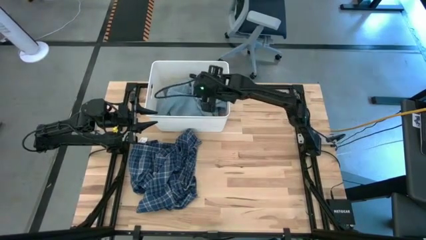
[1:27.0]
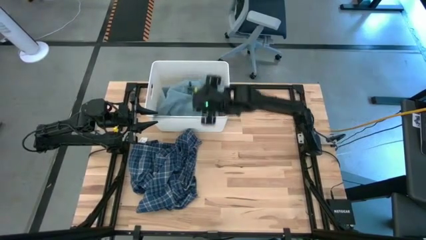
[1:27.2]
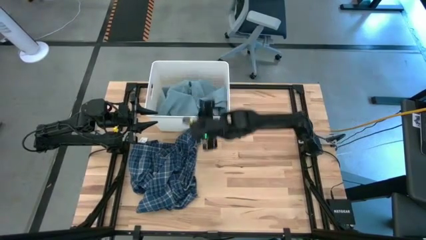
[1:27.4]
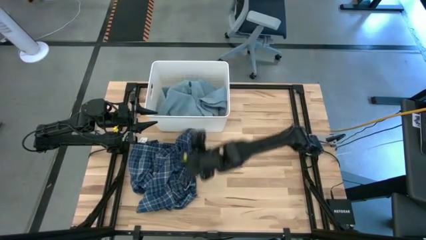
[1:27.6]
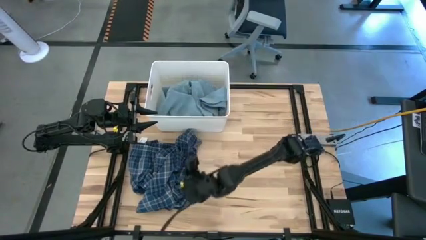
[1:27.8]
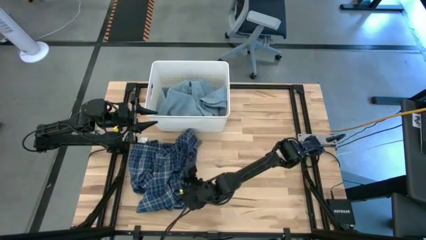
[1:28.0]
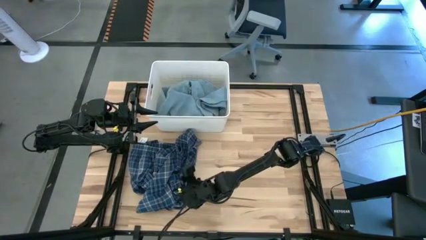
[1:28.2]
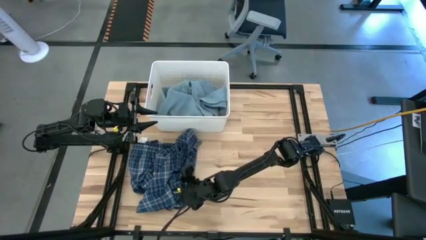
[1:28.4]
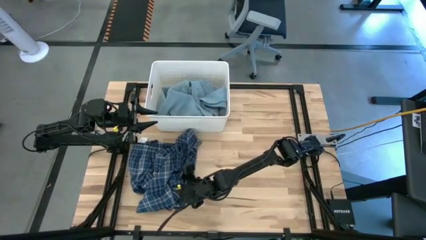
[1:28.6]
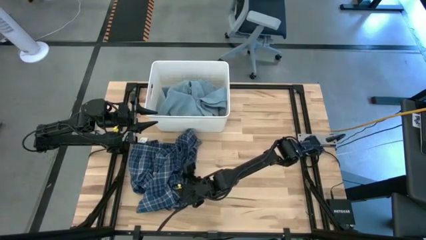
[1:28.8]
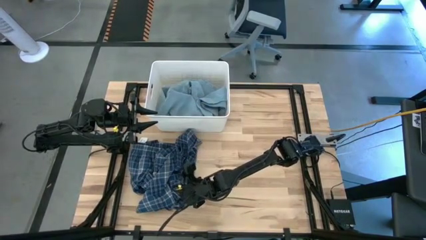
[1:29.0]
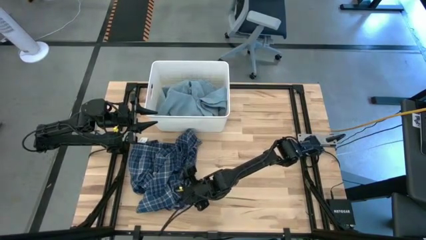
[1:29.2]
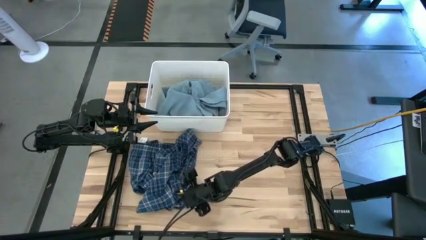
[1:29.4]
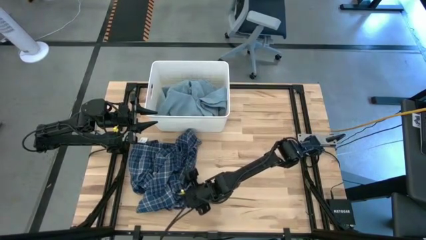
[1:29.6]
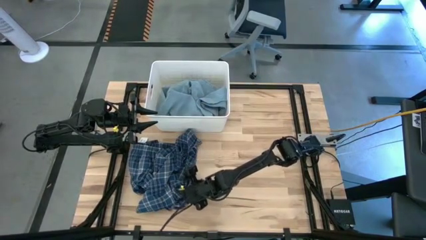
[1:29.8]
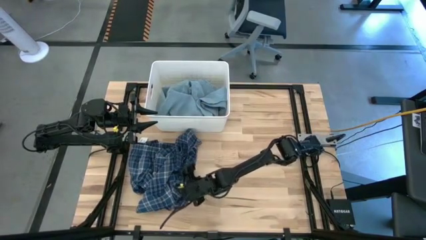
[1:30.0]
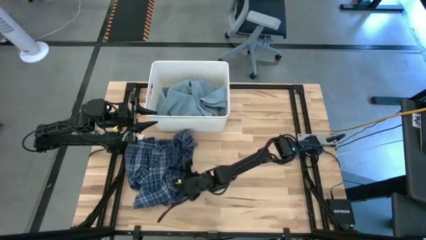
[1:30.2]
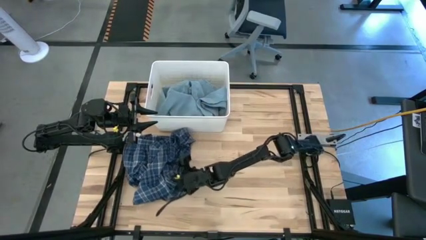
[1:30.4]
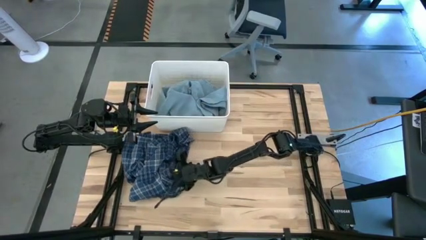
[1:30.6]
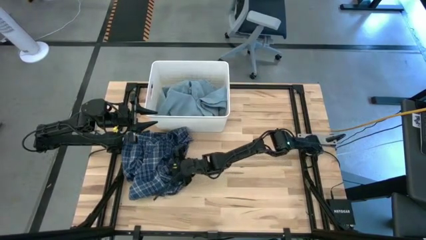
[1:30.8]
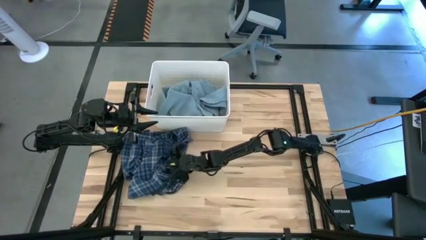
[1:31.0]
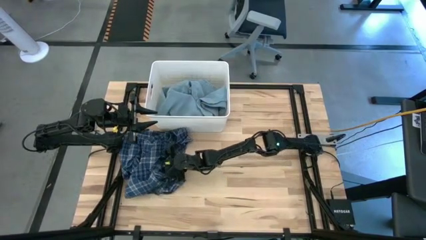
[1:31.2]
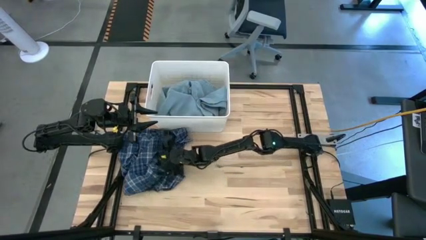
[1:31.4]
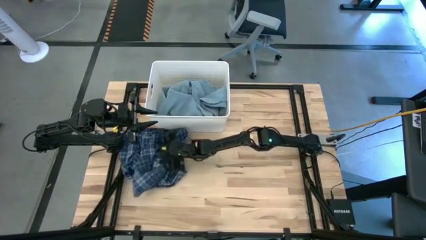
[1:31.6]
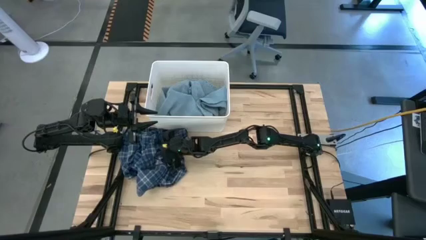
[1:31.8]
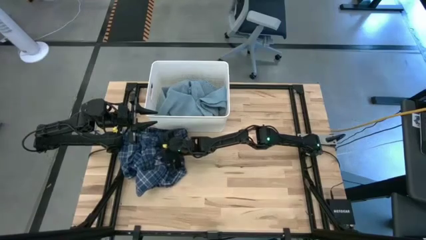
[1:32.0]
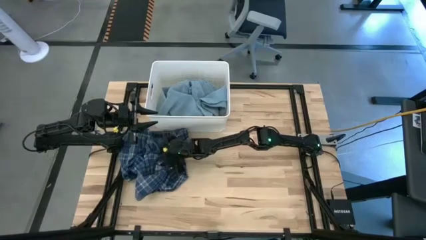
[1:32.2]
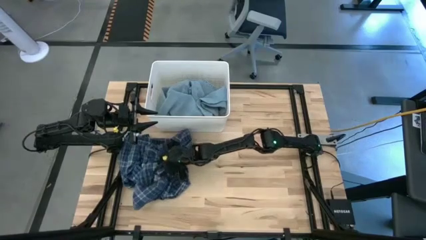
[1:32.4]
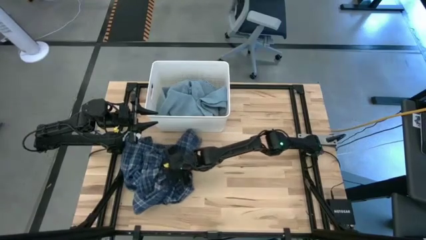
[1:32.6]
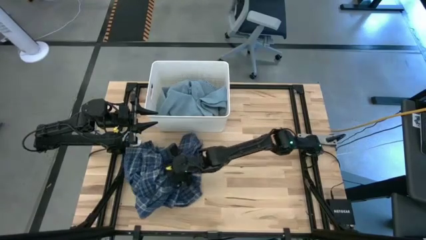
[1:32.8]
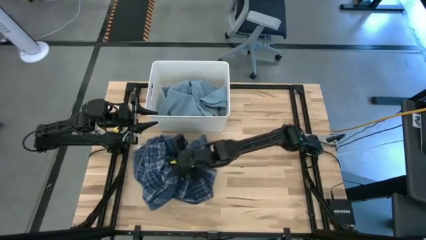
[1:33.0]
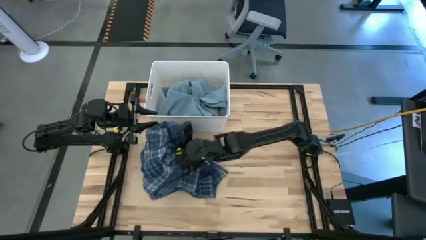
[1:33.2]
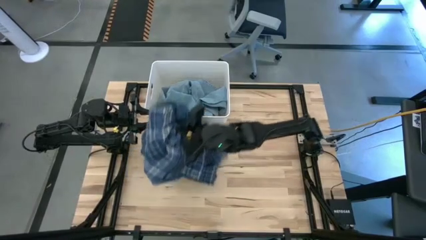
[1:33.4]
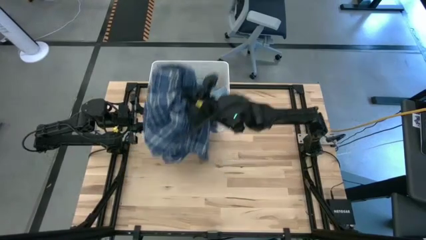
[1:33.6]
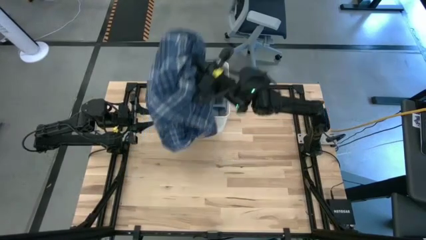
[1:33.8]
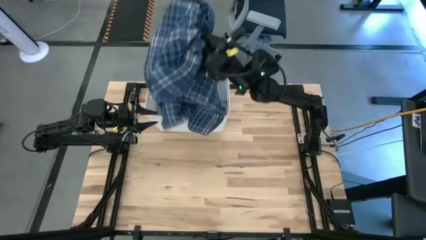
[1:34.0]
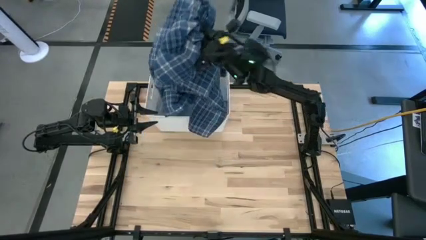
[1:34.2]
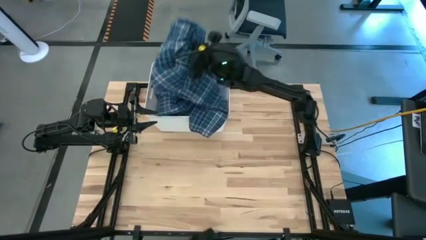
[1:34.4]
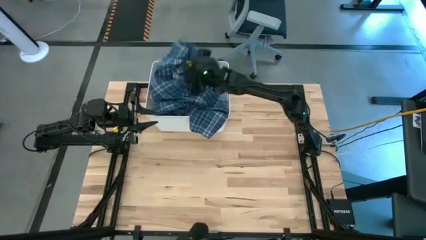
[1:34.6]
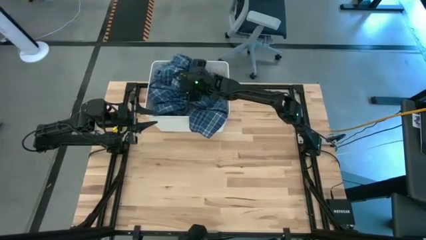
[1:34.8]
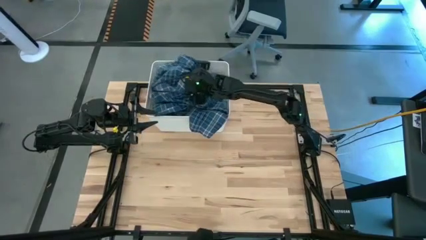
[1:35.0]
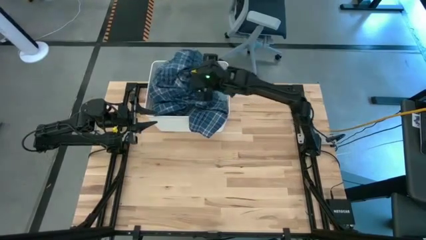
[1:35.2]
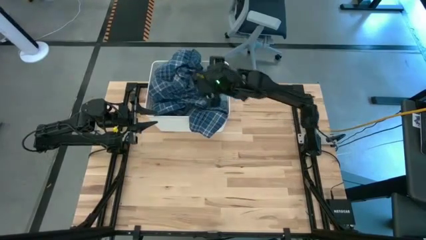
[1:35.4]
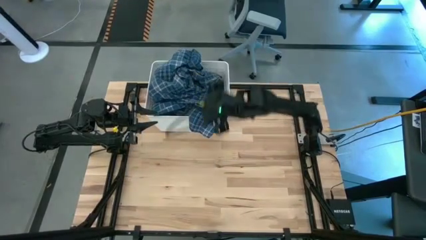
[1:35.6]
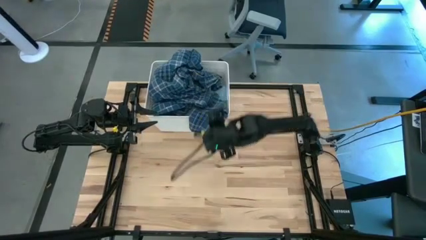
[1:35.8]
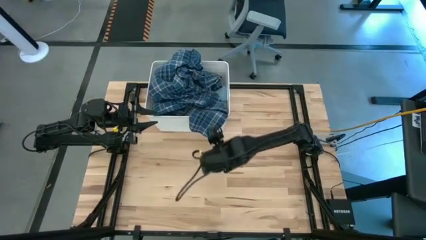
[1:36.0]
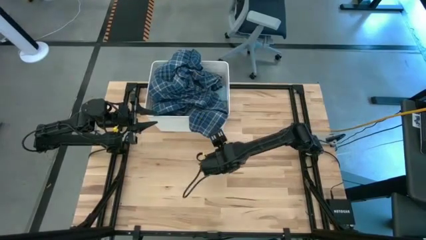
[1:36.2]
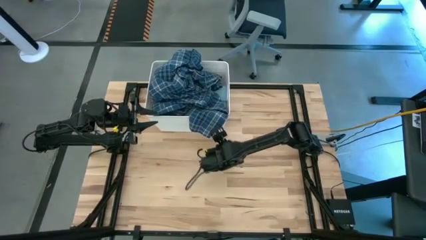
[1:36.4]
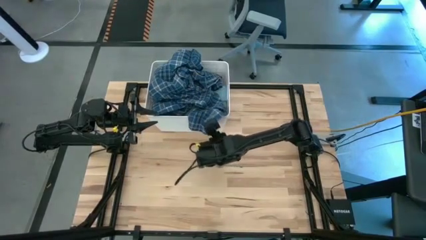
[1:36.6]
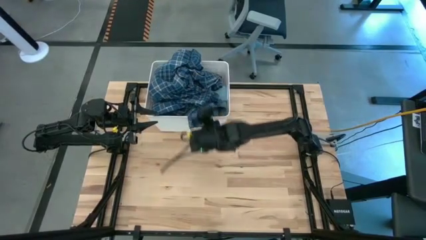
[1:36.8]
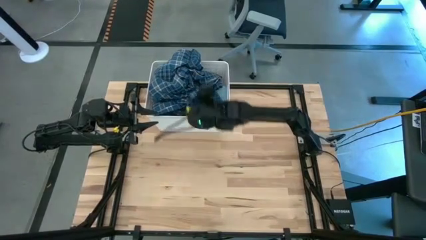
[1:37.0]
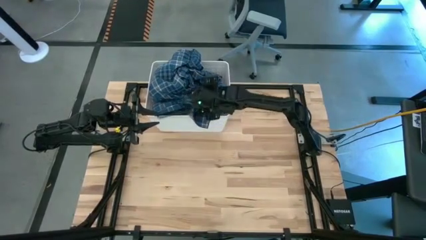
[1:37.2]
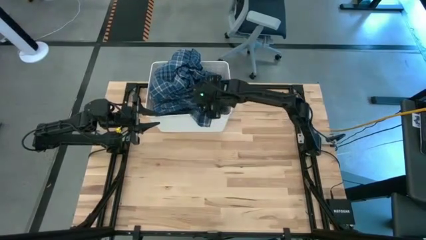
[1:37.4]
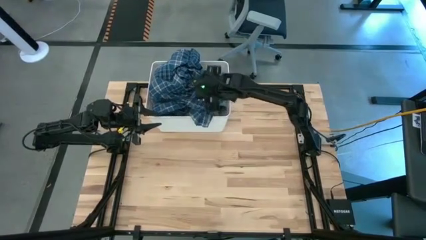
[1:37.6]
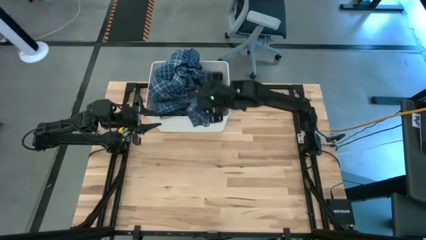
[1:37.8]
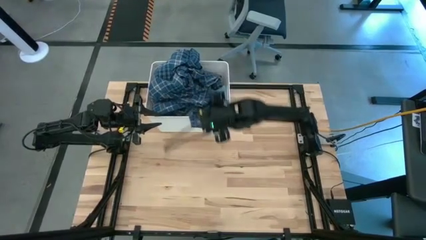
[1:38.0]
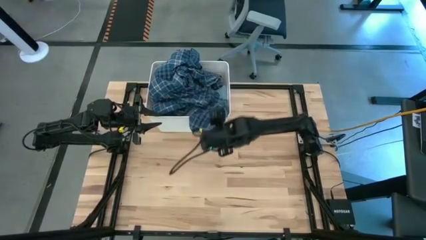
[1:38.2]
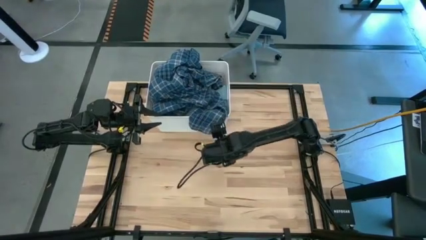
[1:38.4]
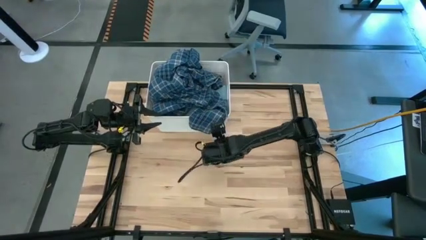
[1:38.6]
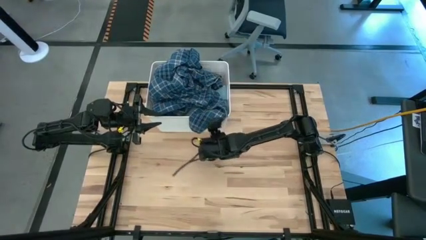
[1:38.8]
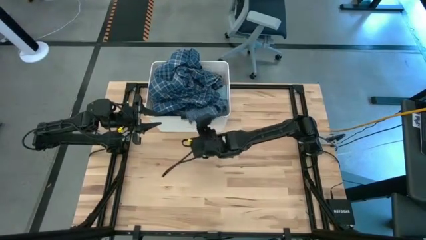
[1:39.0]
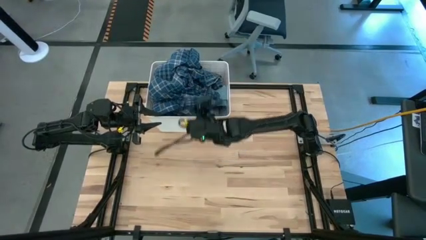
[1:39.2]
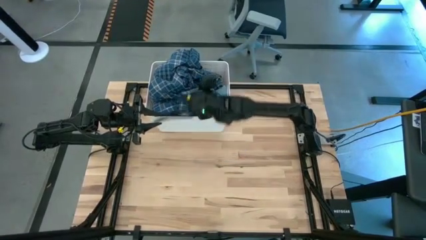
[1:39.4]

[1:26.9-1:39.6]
Task: Sort clothes
Put the blue plaid shirt into the white bin

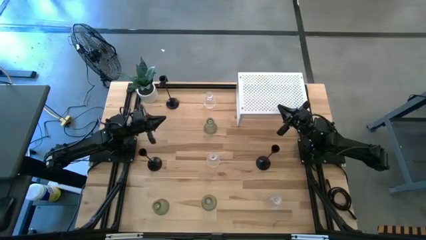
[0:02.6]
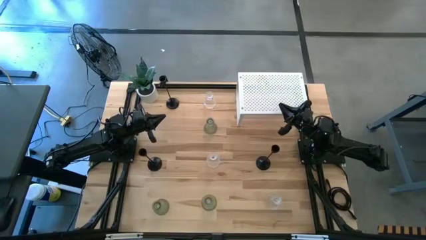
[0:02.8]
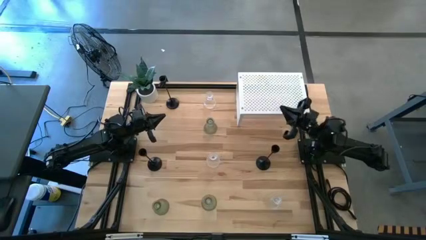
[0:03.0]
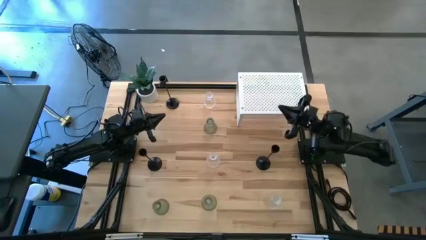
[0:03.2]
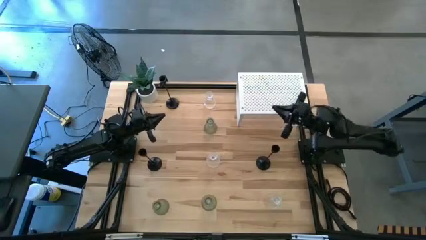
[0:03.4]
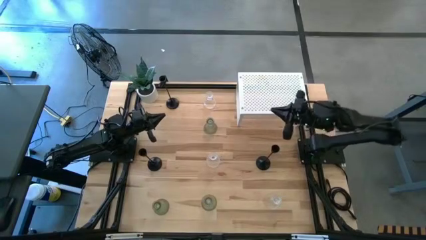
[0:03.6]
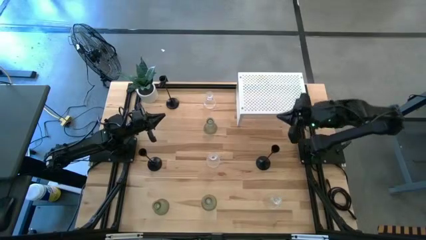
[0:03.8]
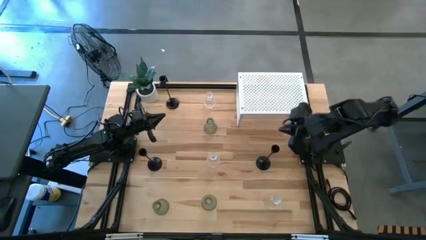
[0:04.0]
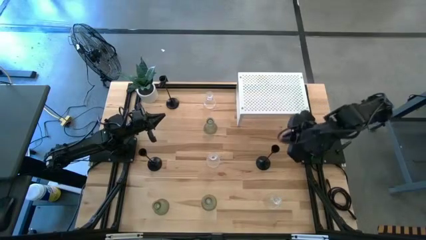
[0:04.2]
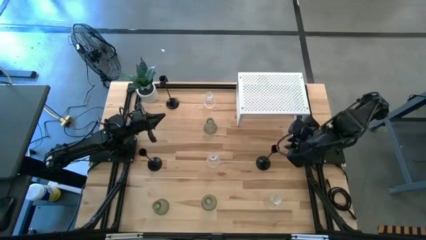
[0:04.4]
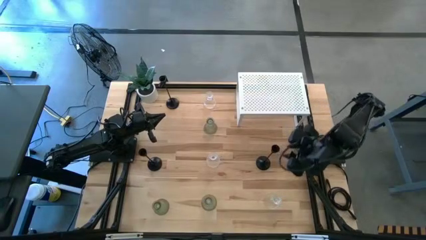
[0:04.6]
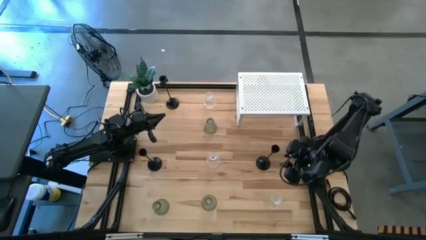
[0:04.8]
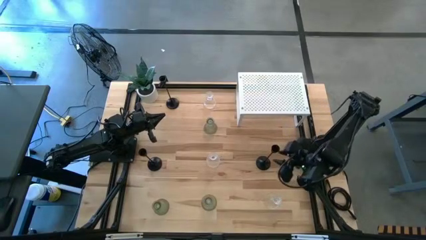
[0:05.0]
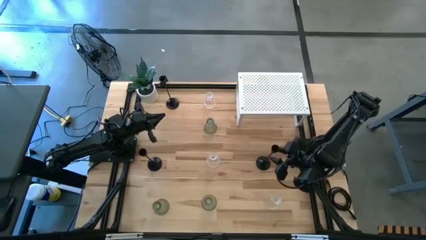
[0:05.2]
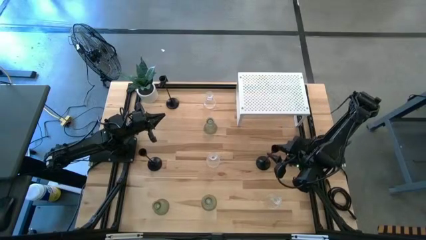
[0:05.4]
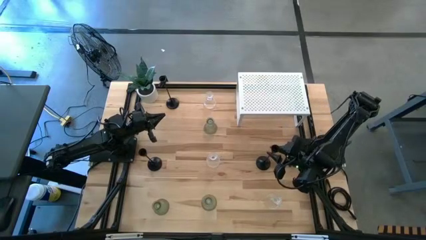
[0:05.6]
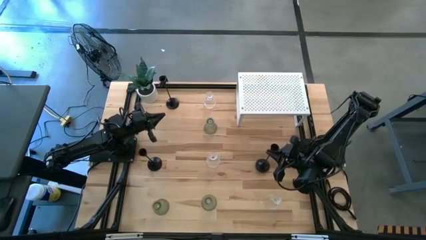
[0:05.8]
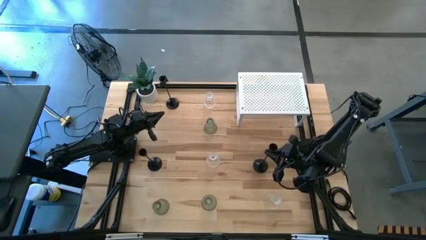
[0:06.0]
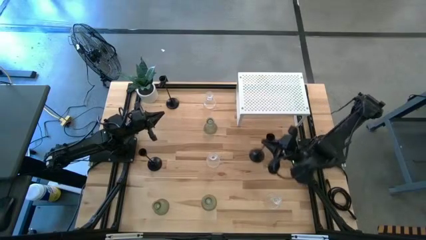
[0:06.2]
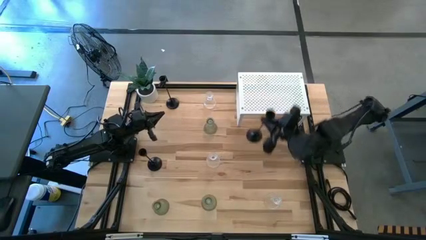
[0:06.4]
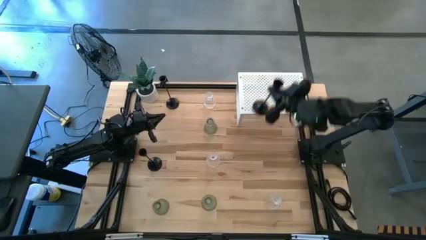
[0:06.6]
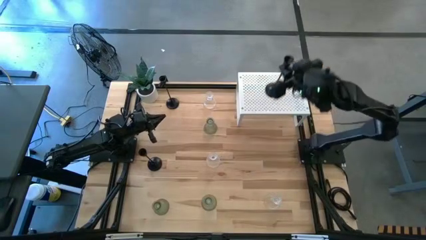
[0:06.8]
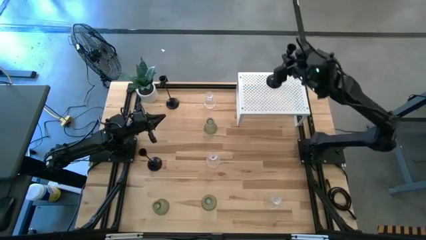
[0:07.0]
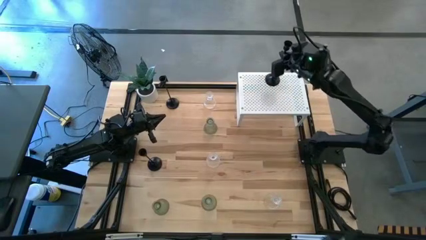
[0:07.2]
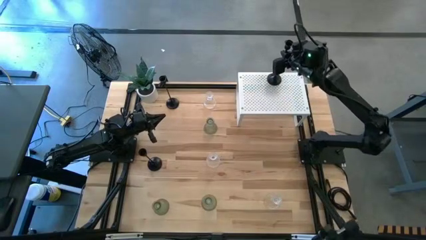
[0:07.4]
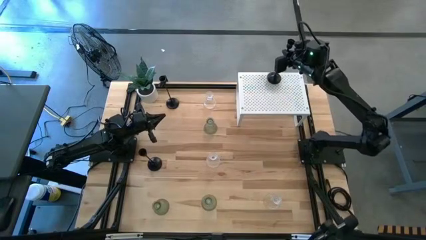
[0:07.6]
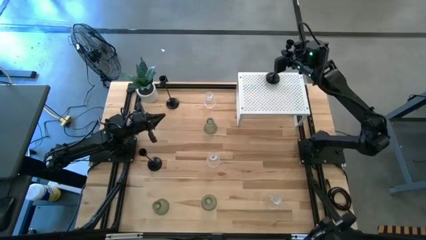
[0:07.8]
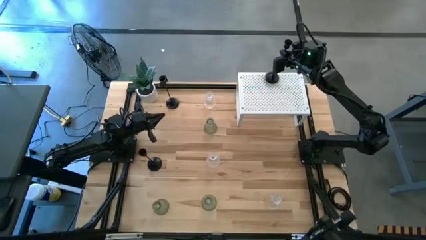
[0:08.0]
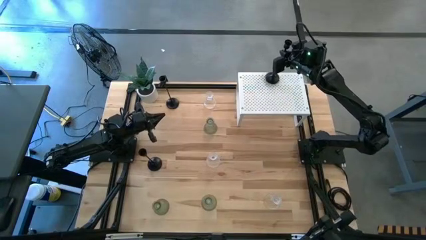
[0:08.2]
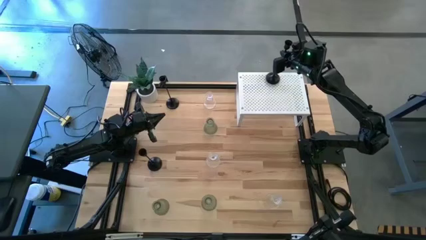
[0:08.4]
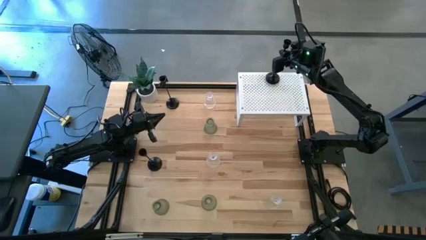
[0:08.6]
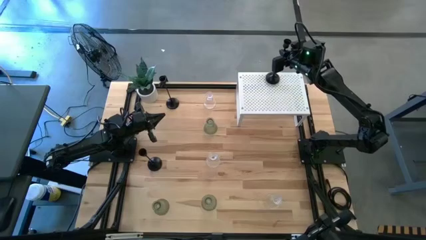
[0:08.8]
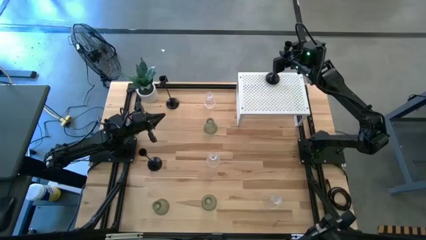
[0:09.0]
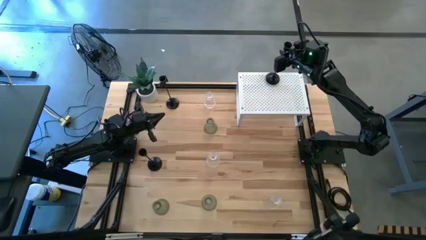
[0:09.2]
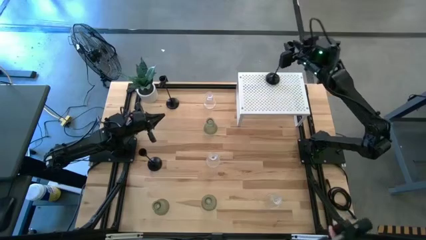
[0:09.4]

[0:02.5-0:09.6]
Task: Pick & Place candle stick holders
Put the bottom right black candle holder on the shelf
